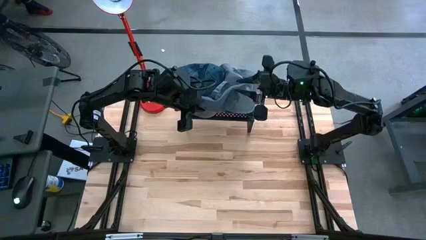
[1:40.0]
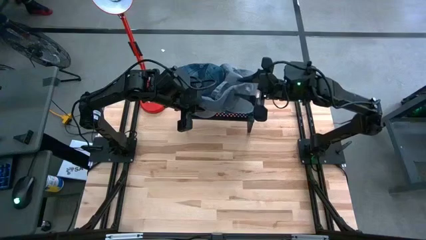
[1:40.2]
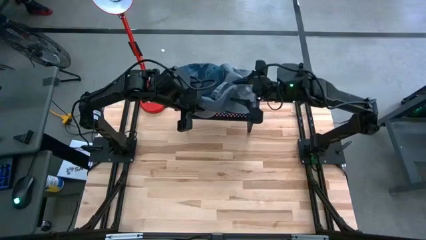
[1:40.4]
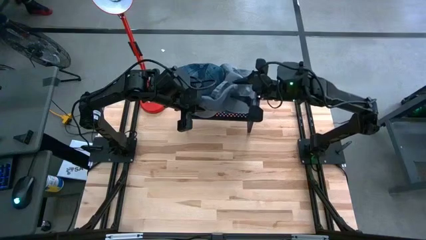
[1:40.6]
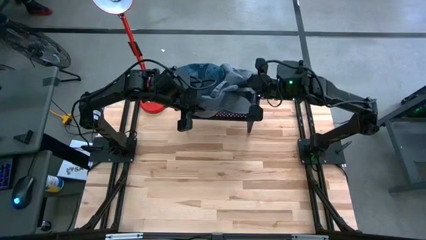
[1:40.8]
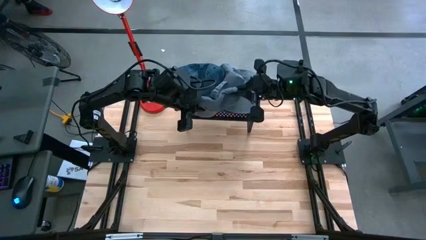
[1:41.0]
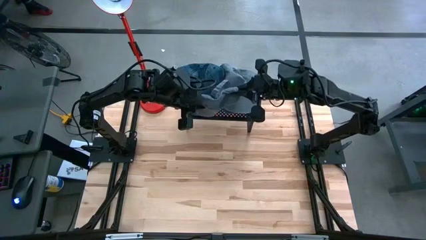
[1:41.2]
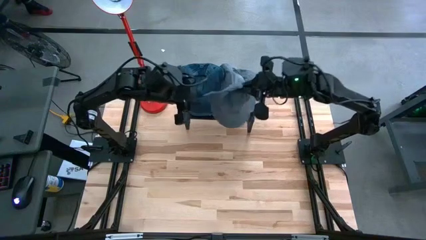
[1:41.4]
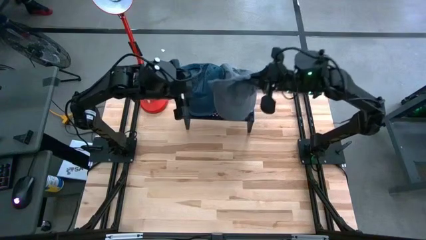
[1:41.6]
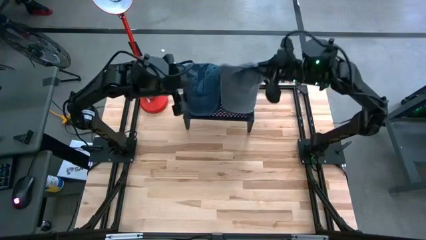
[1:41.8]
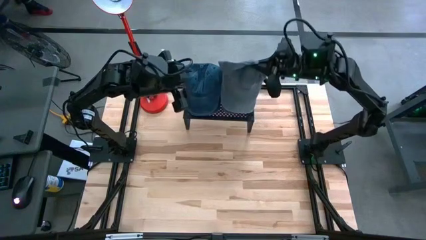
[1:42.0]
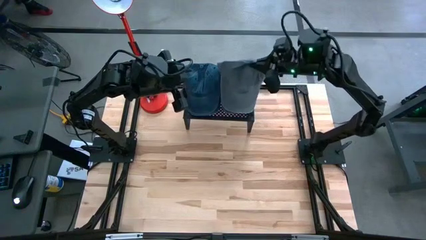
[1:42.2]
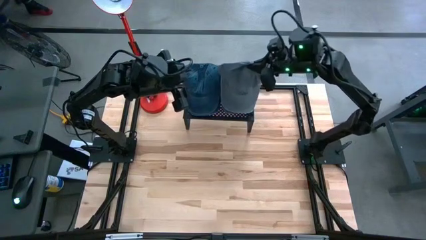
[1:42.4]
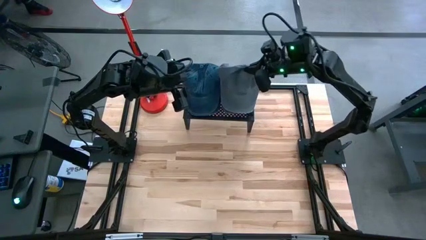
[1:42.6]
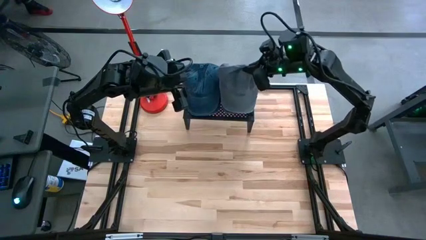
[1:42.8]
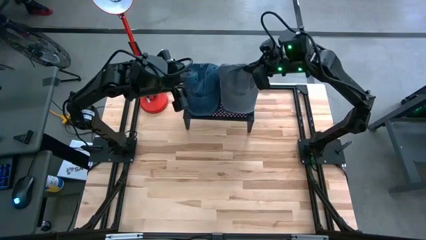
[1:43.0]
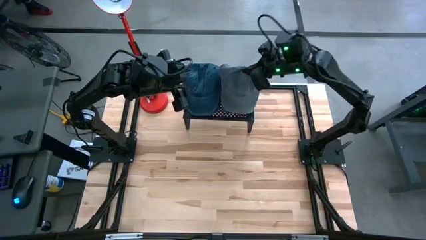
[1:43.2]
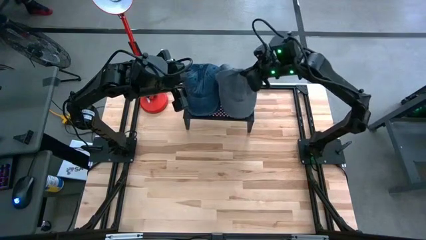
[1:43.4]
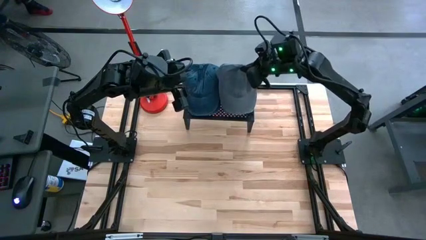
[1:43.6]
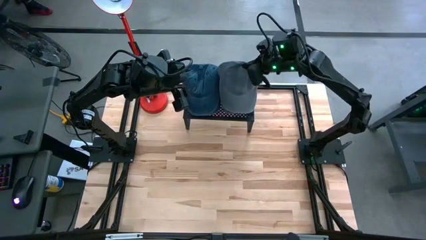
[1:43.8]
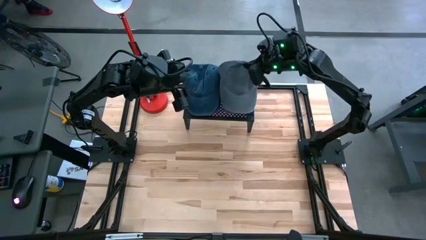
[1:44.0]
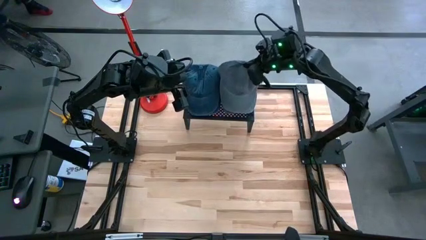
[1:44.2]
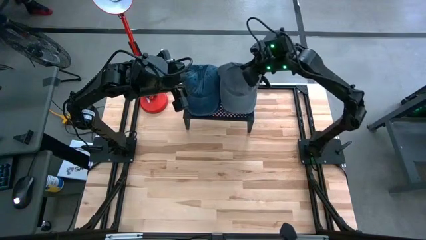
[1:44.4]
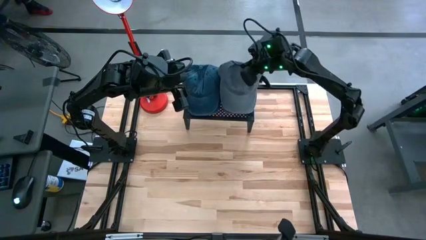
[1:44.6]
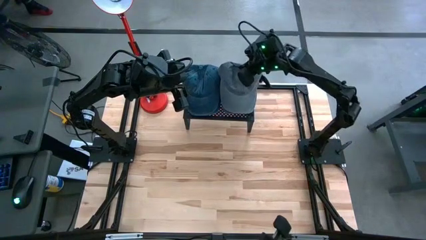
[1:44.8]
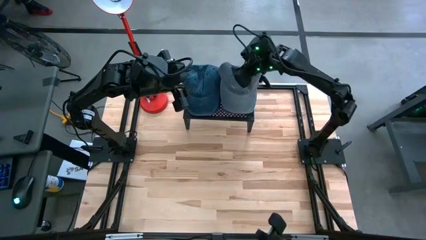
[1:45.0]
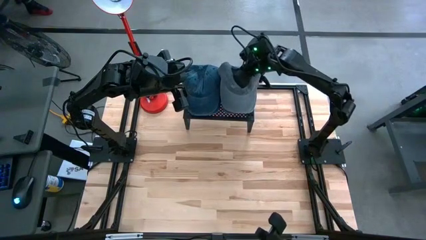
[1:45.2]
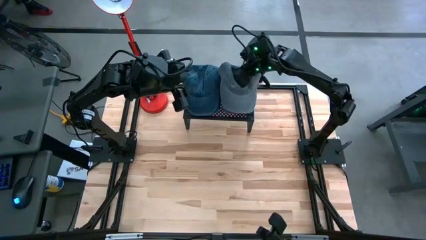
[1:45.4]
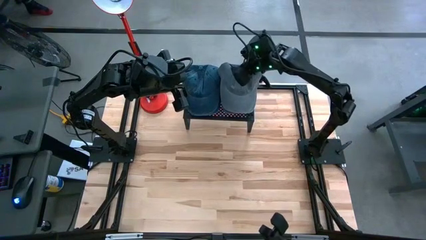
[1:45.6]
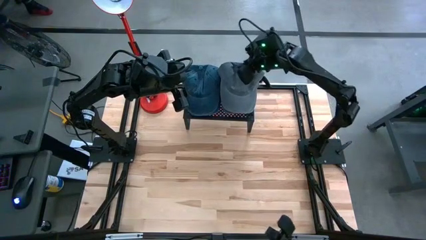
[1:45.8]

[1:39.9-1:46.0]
Task: Pick & Place hat
Stack the gray cap on top of the gray cap on the shelf

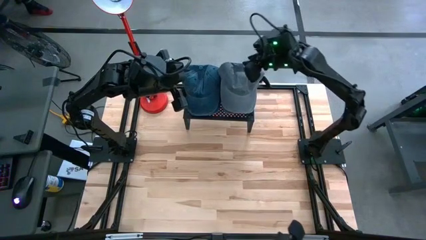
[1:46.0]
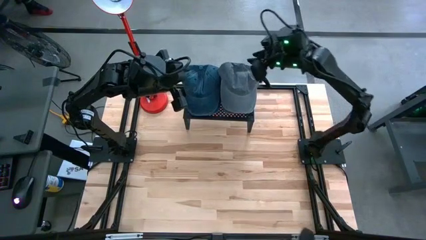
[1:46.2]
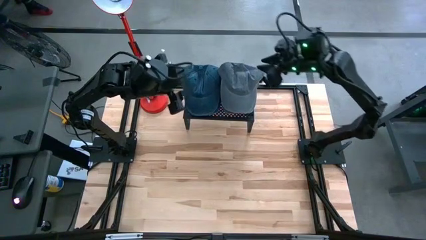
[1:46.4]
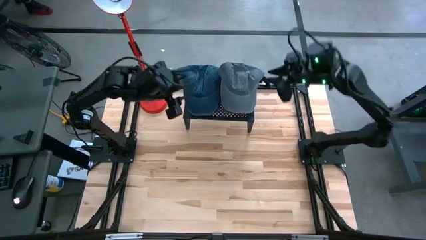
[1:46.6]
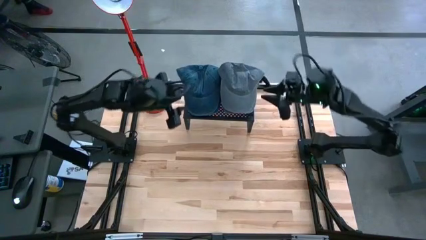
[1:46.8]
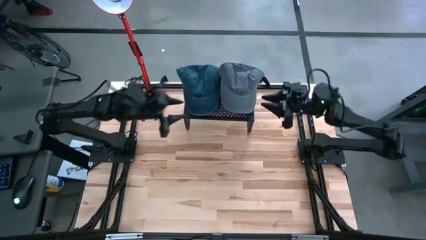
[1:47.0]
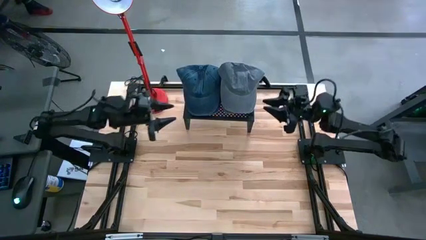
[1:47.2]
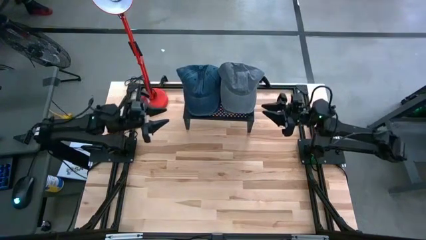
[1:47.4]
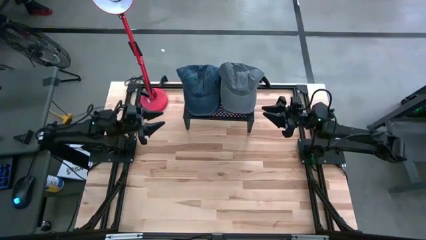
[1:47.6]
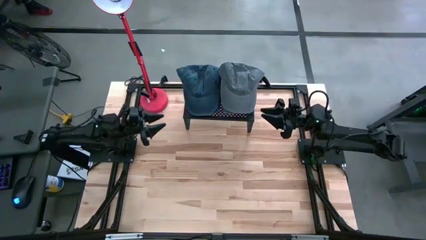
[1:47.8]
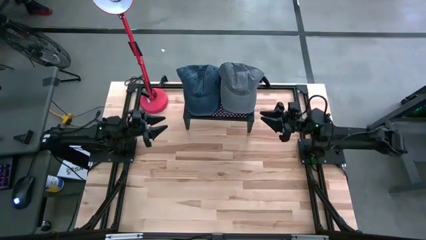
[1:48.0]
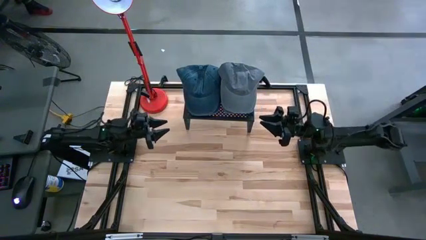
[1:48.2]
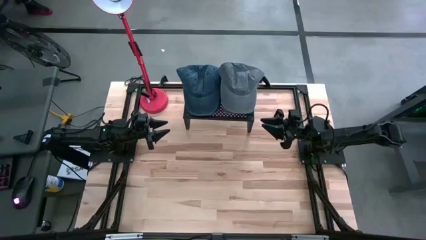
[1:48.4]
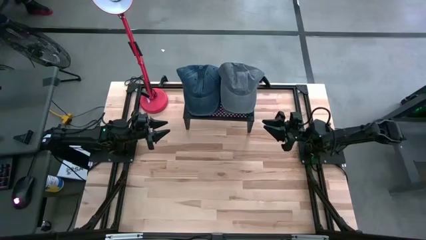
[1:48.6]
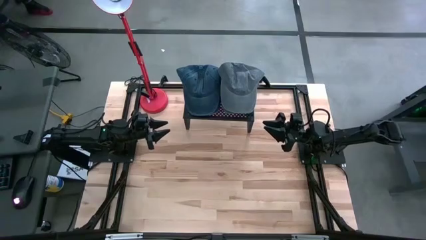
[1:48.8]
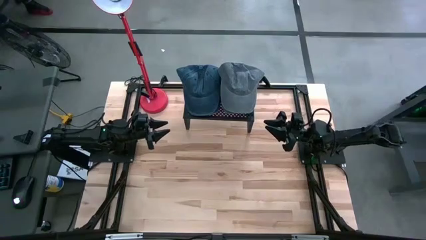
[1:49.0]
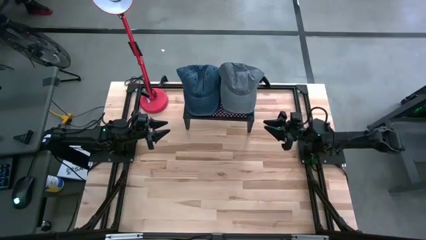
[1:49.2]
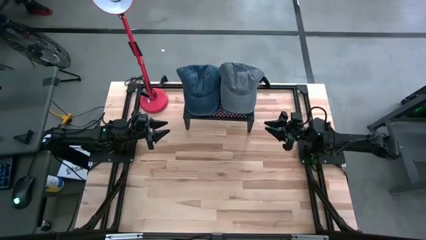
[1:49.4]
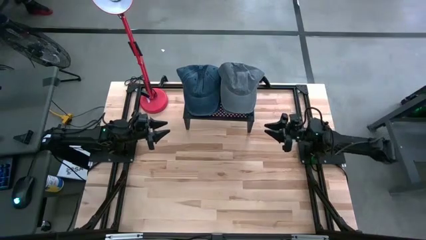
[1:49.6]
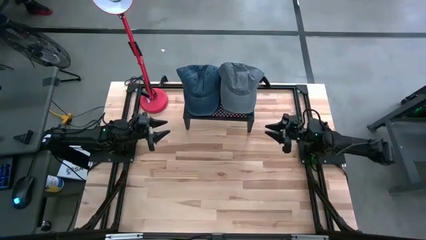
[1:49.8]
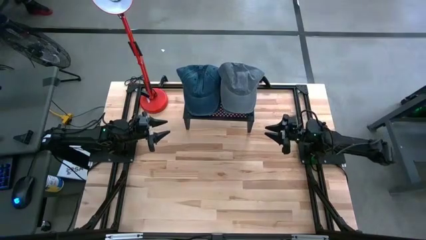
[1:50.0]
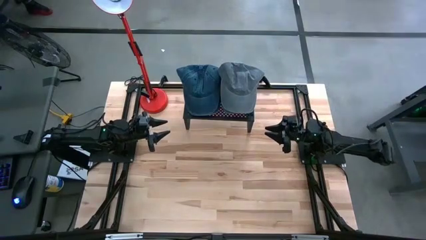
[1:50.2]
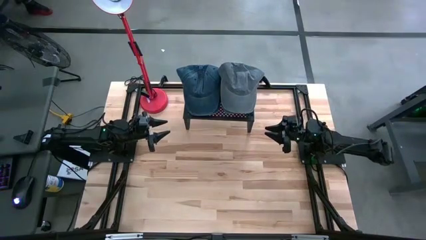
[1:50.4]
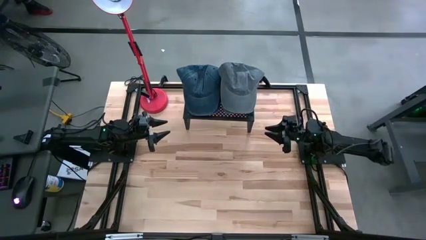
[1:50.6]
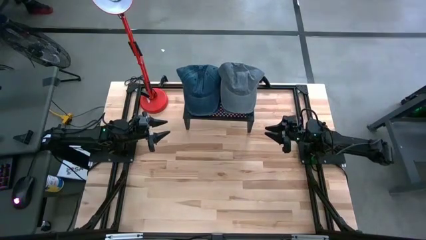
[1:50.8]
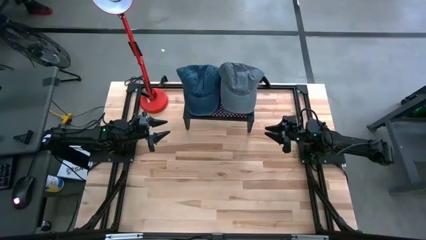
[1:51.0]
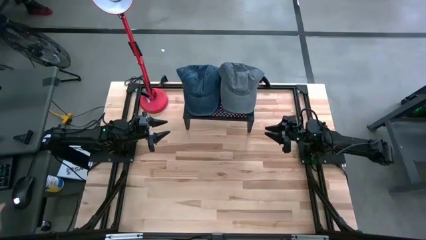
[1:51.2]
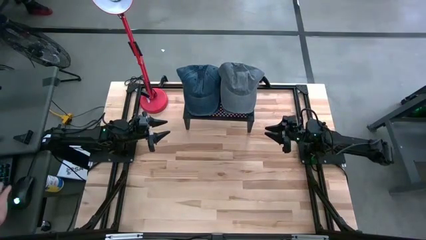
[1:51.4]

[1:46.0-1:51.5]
Return to Home Position

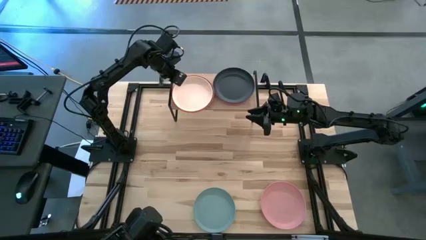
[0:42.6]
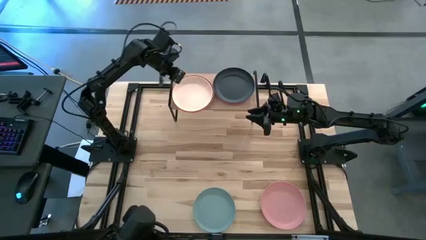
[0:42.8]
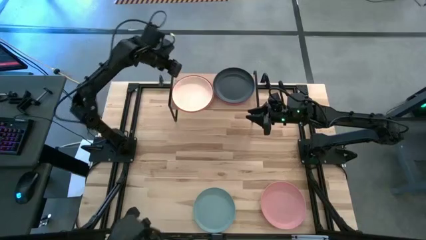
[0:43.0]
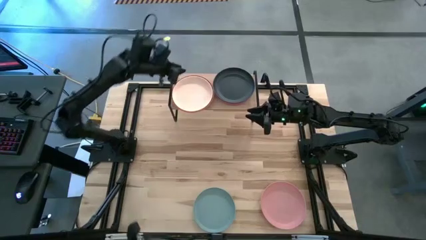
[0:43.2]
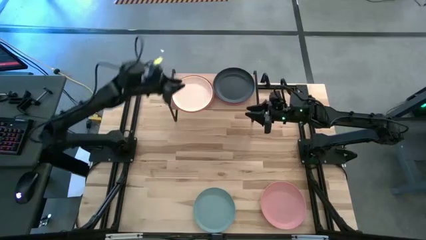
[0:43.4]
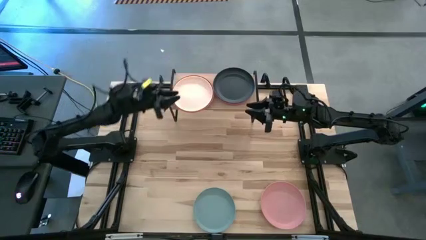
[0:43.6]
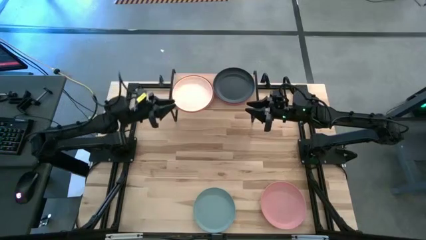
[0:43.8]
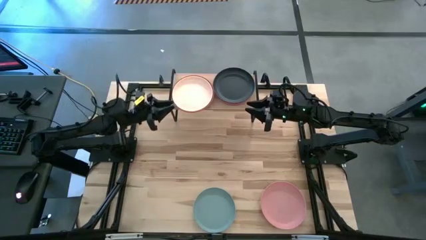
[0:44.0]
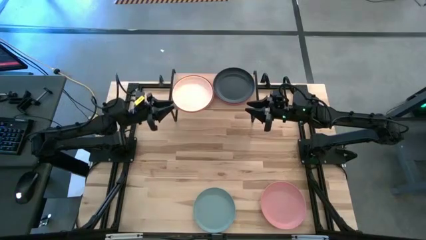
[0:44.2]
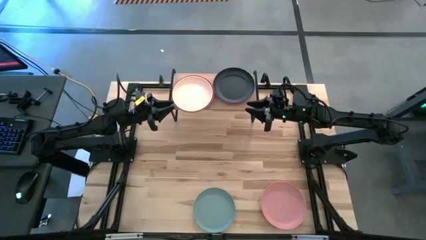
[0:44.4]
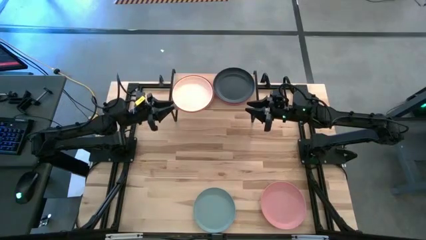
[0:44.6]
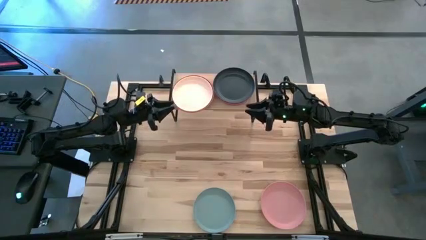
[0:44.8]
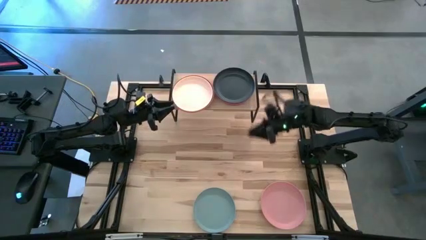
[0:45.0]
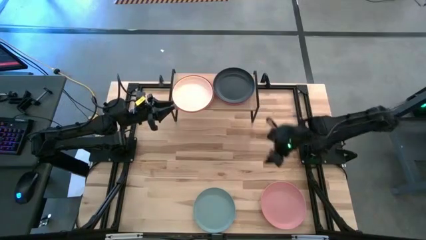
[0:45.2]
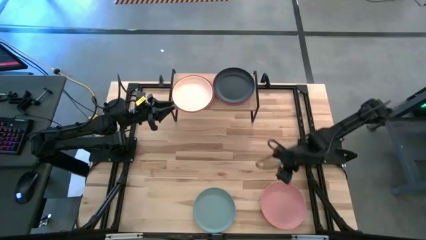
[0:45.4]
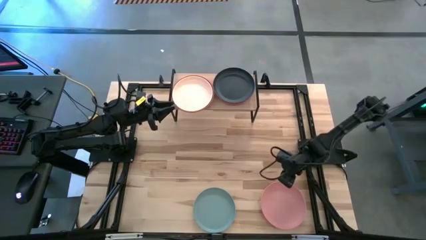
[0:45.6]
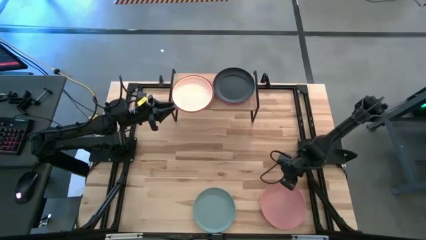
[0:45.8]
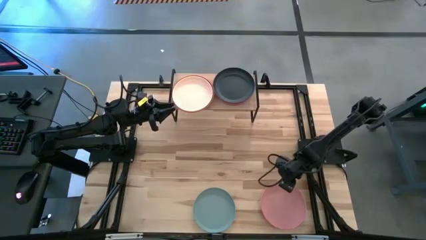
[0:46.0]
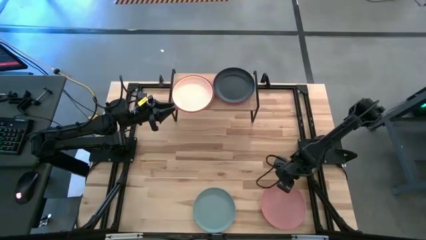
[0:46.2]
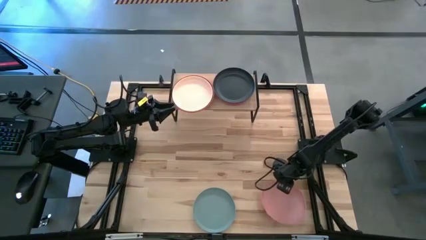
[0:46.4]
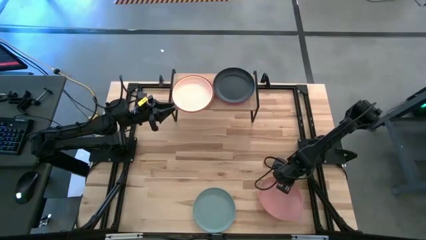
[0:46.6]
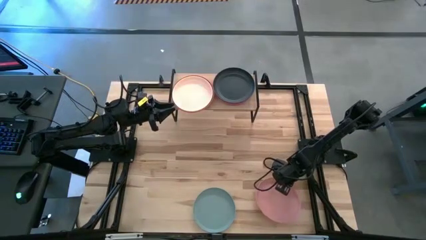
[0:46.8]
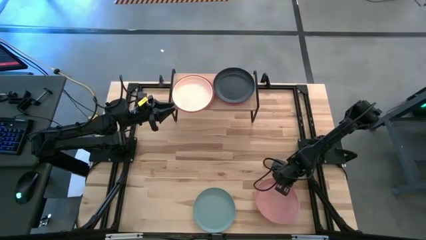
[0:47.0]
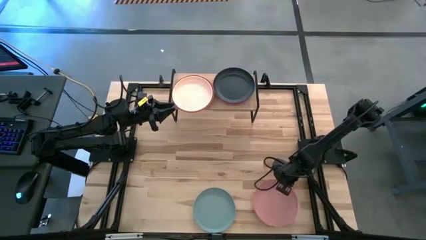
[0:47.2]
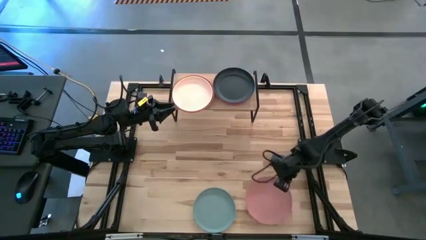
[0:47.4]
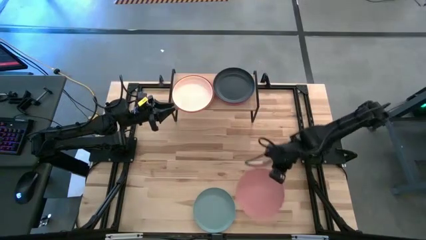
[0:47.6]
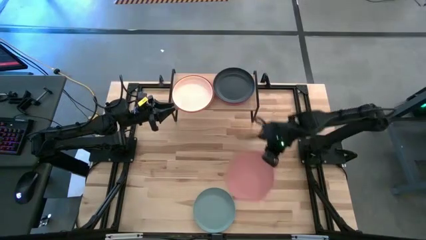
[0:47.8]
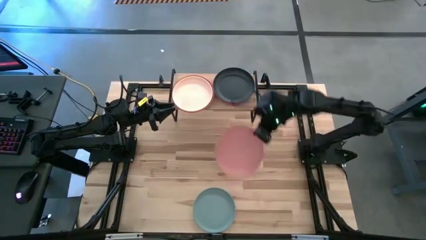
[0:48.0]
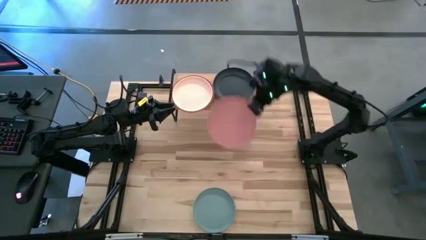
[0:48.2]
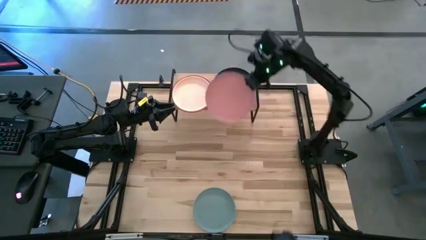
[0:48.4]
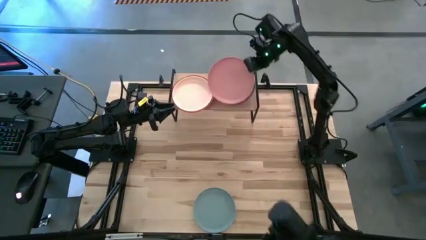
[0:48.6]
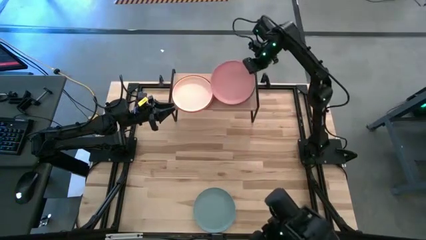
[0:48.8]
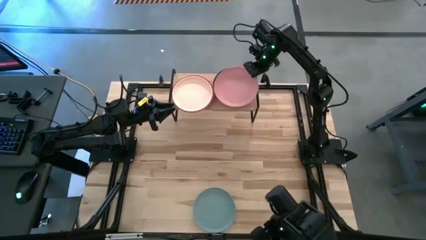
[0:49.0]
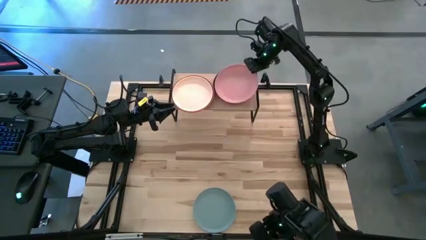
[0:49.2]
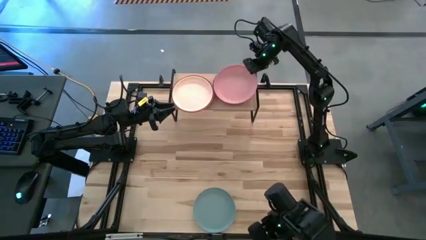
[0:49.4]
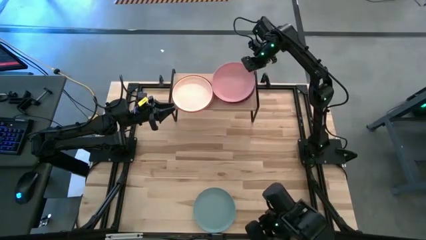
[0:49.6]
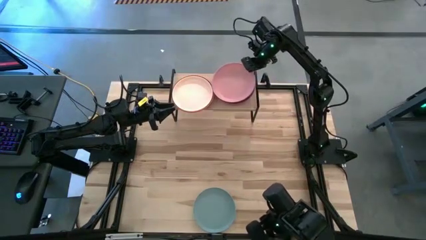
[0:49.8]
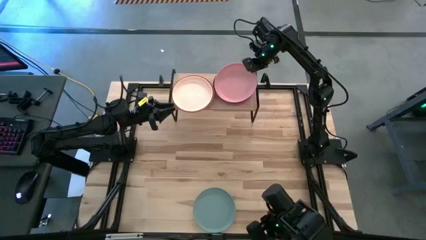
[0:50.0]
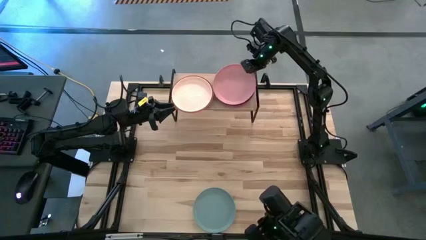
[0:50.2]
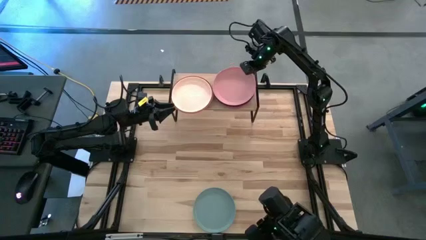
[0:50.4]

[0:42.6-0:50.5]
Task: Place and stack plates onto a shelf
Stack the light pink plate on top of the black plate on the shelf
